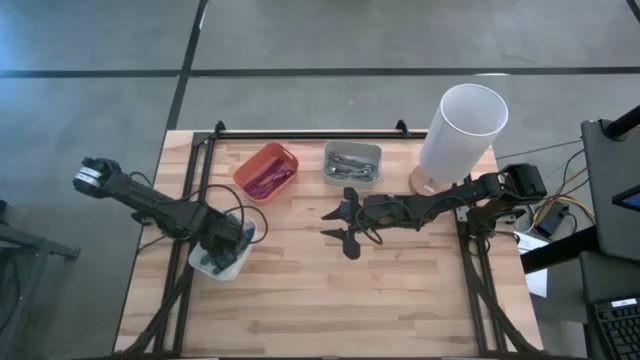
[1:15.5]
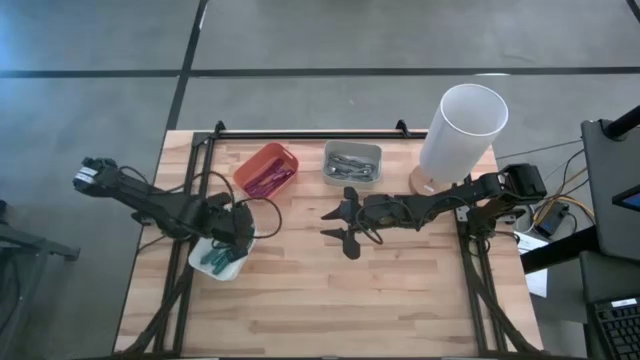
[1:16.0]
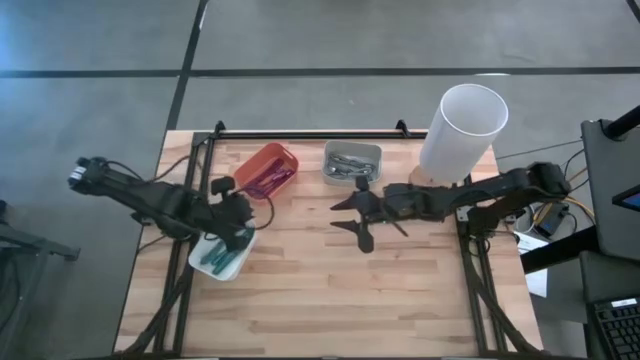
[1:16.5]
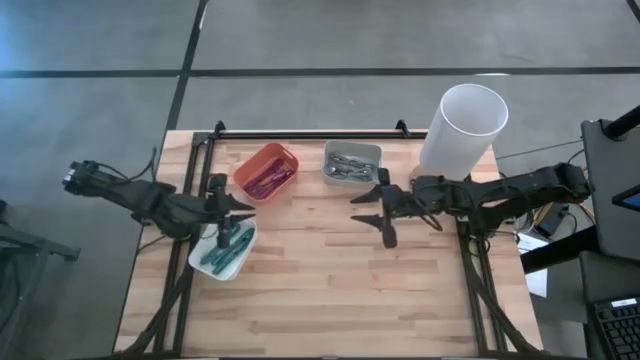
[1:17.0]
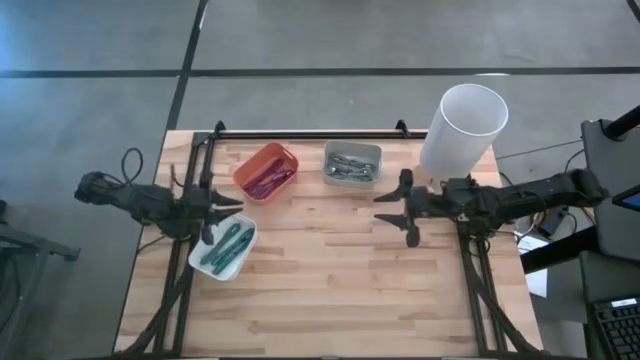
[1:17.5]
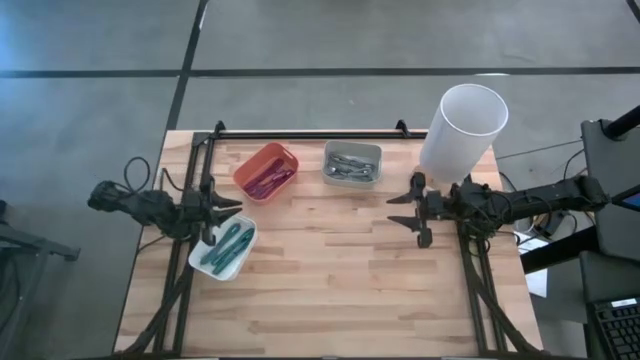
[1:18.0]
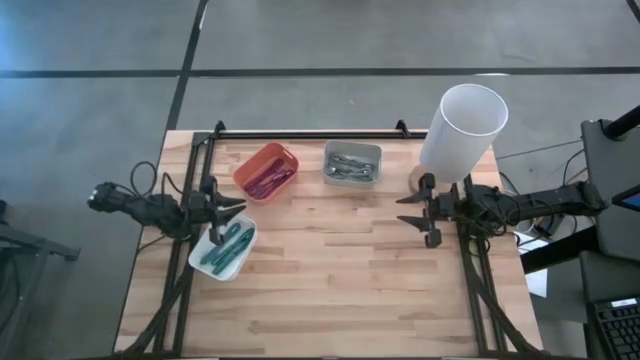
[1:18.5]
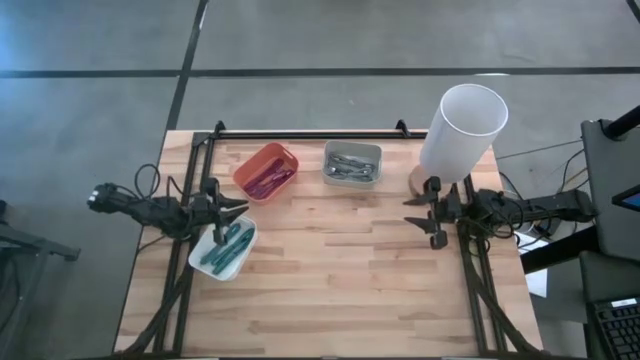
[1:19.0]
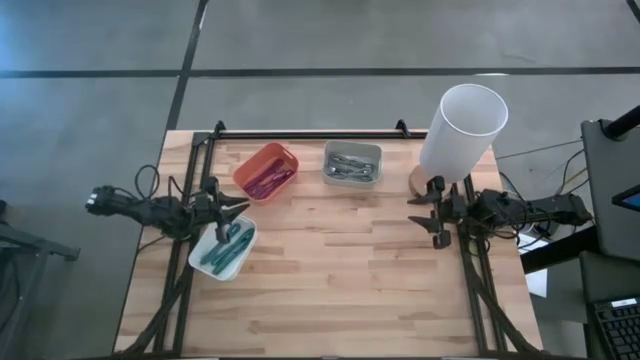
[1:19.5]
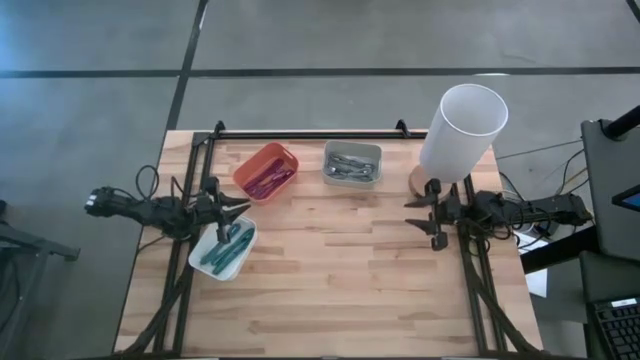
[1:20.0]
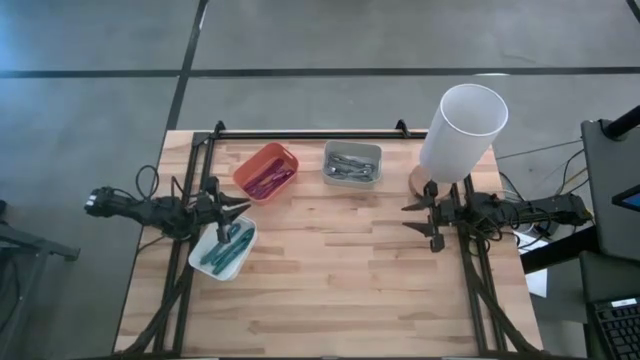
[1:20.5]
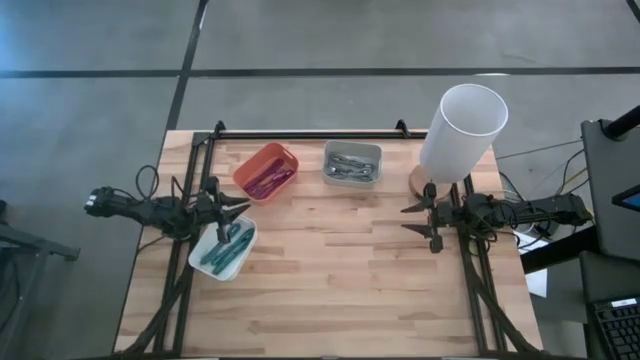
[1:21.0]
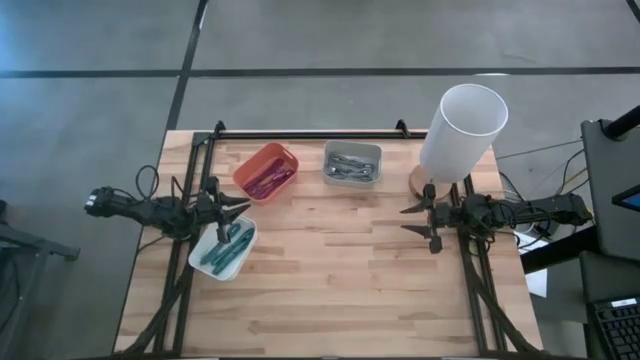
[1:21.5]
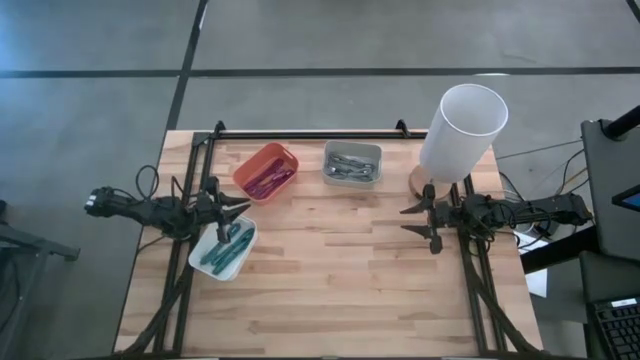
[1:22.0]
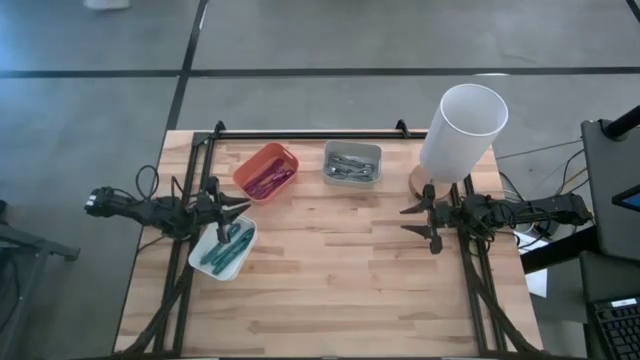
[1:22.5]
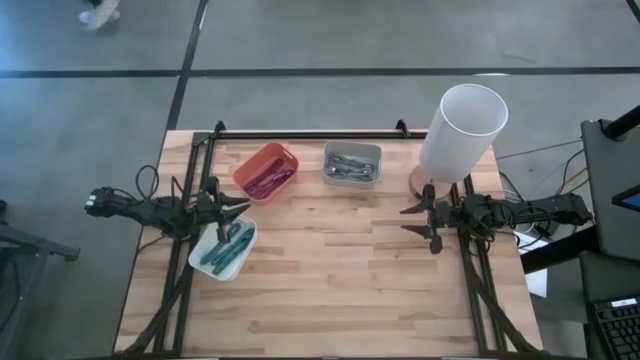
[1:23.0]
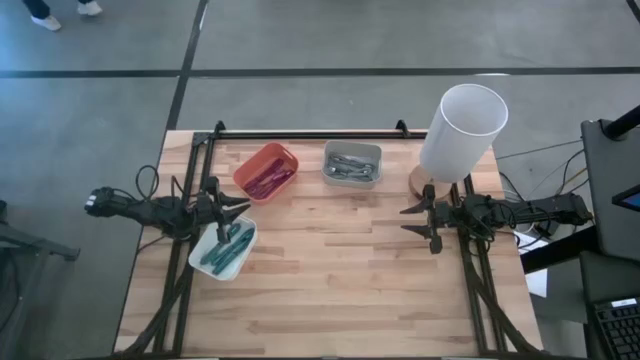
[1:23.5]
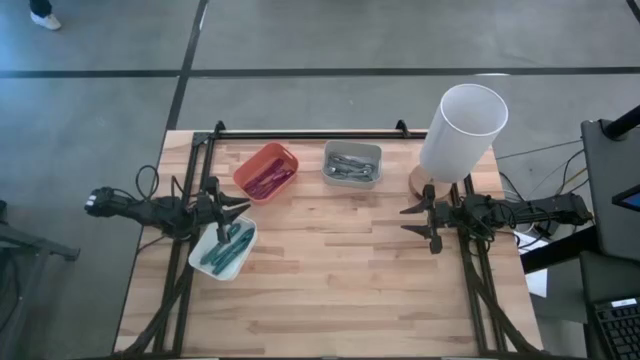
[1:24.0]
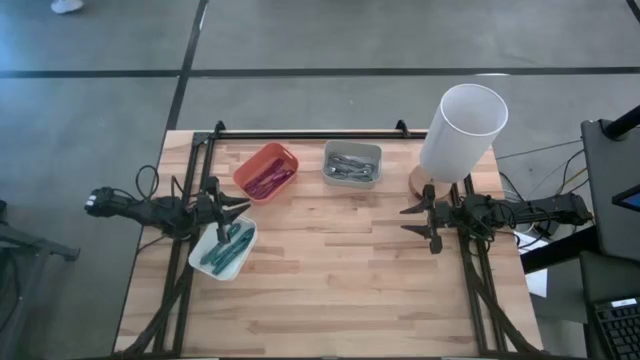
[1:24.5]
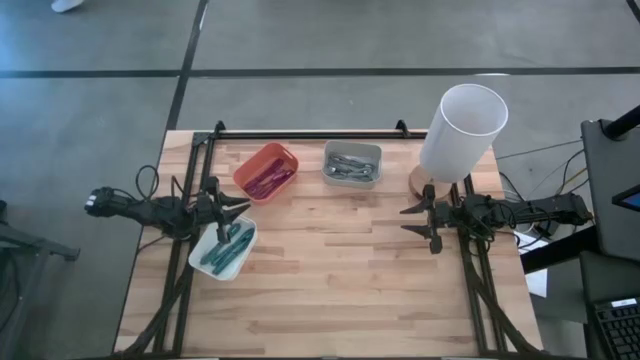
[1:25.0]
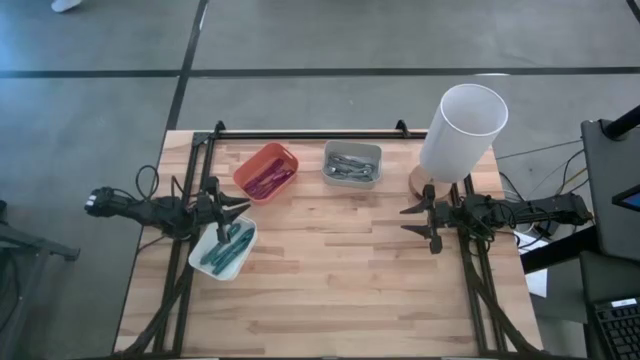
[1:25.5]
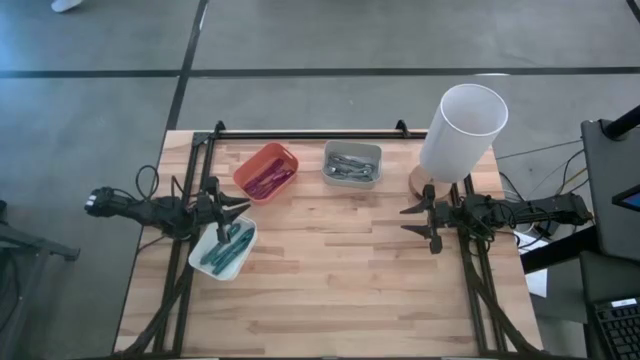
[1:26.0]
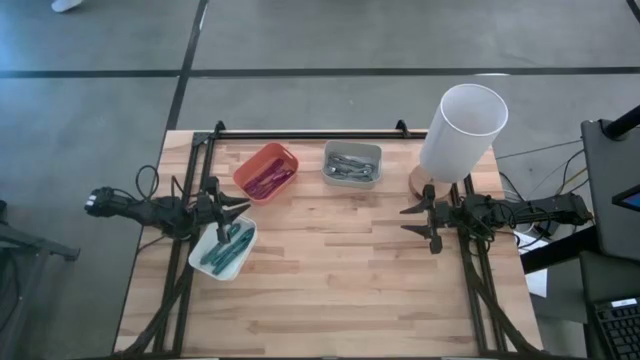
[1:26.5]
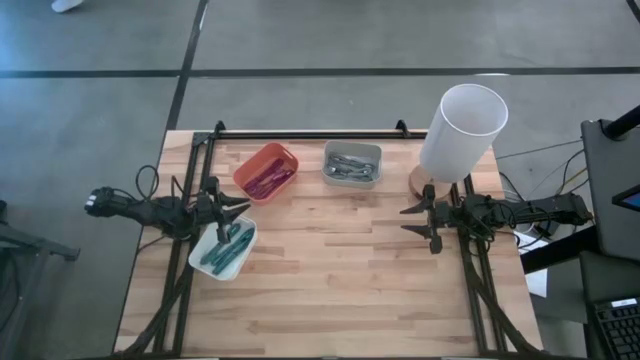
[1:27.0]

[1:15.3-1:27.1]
Task: Pick & Place USB Port
Return to Home Position

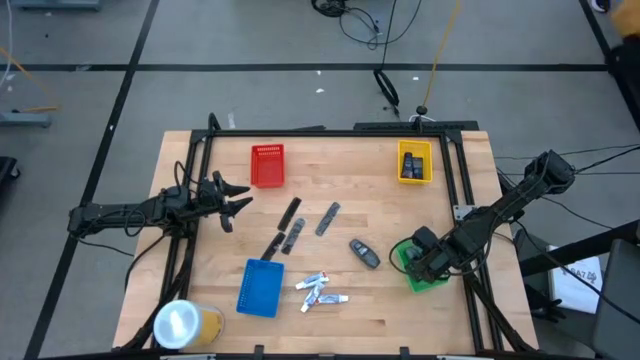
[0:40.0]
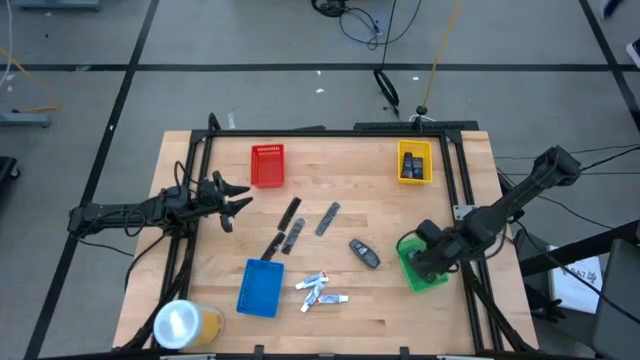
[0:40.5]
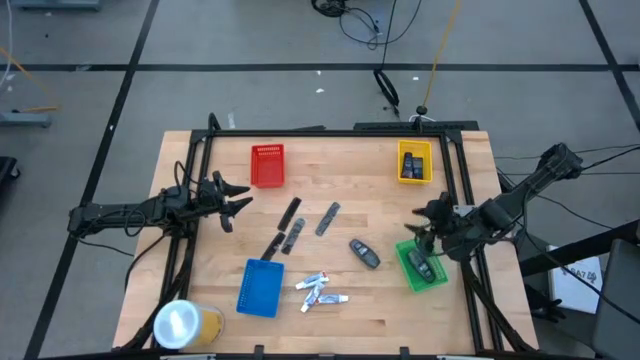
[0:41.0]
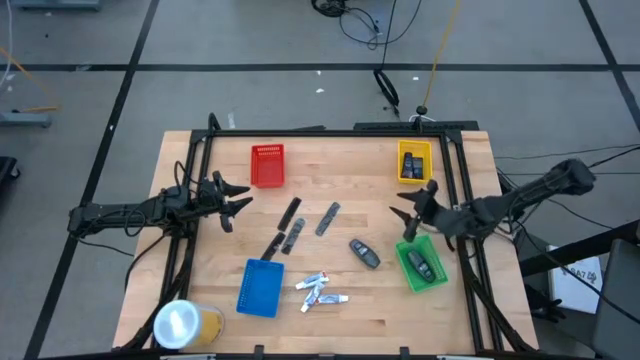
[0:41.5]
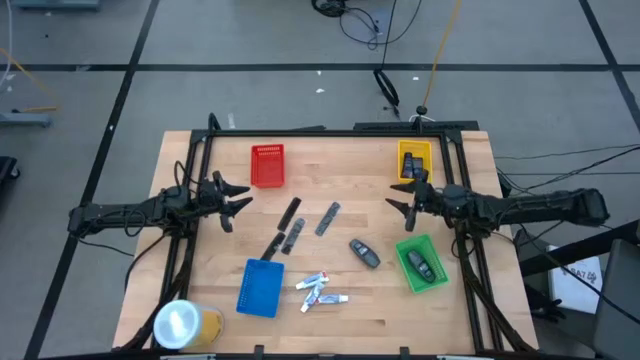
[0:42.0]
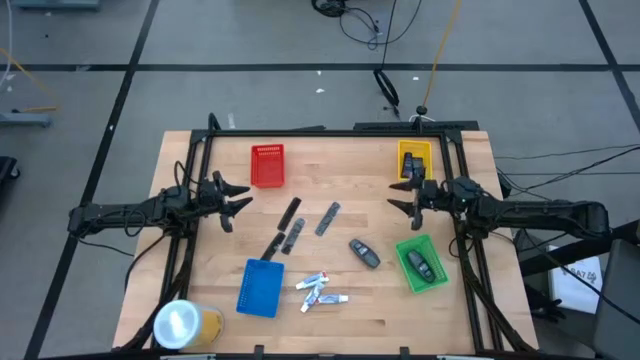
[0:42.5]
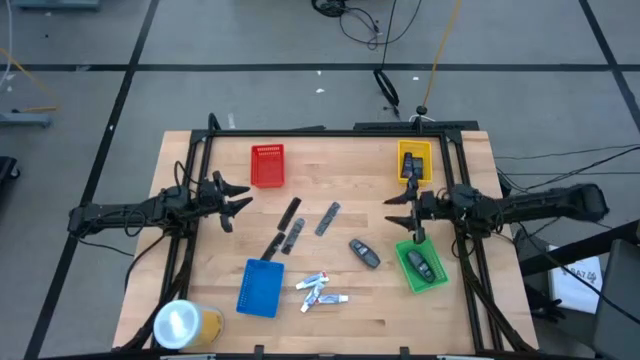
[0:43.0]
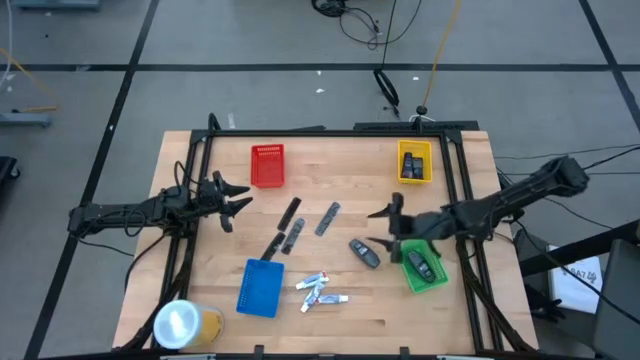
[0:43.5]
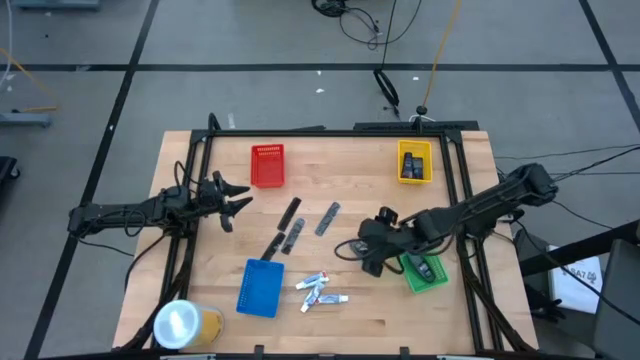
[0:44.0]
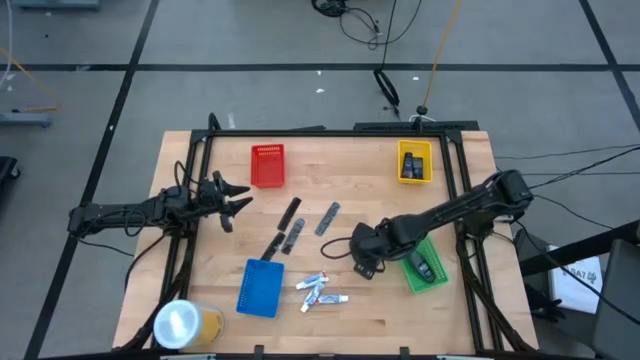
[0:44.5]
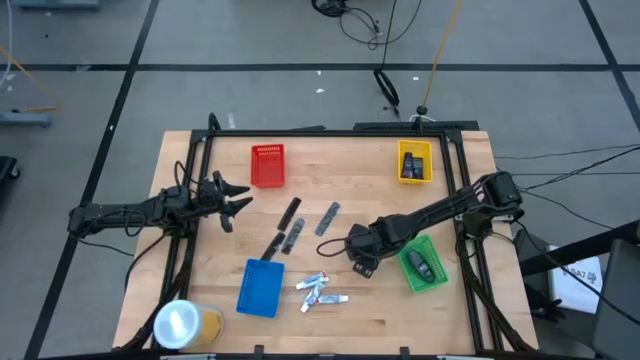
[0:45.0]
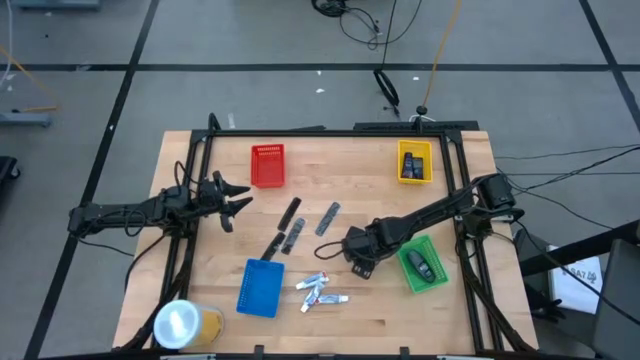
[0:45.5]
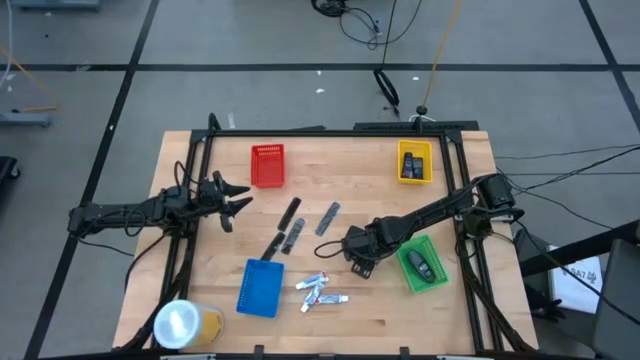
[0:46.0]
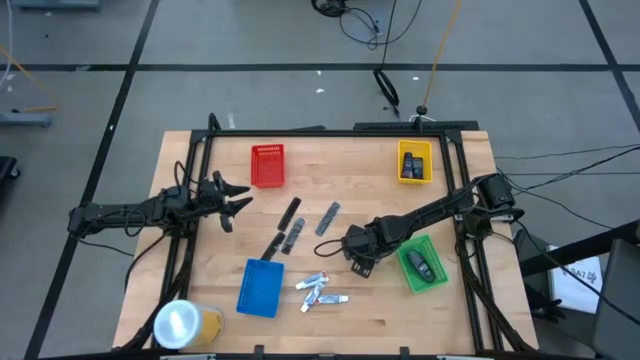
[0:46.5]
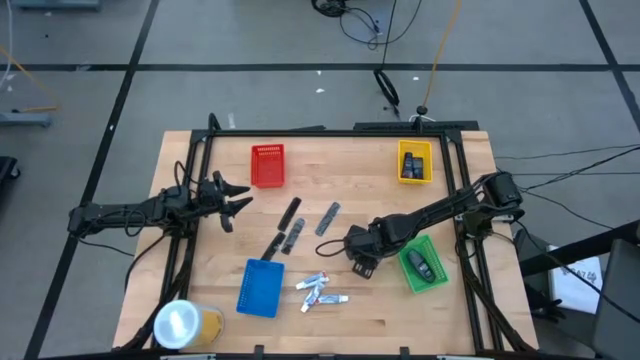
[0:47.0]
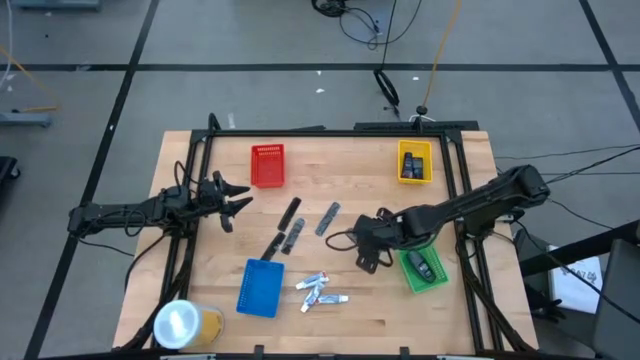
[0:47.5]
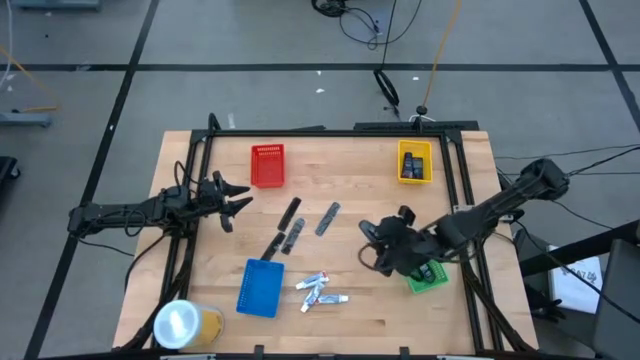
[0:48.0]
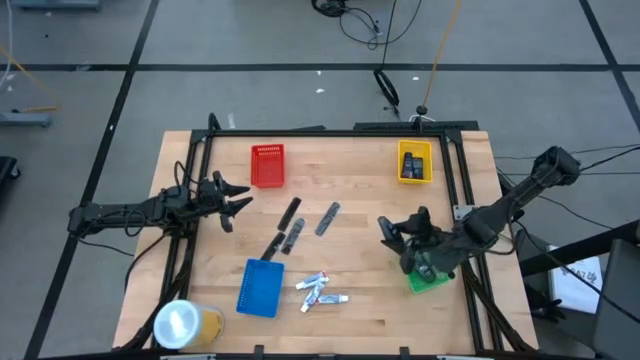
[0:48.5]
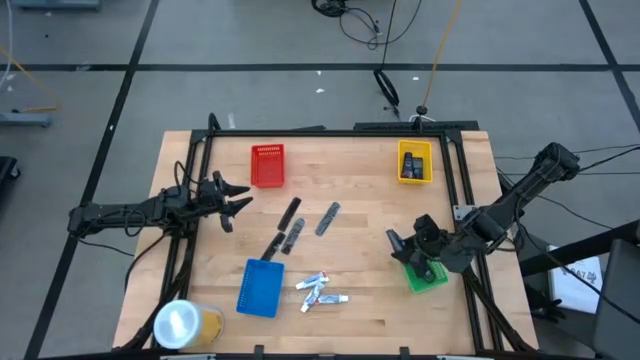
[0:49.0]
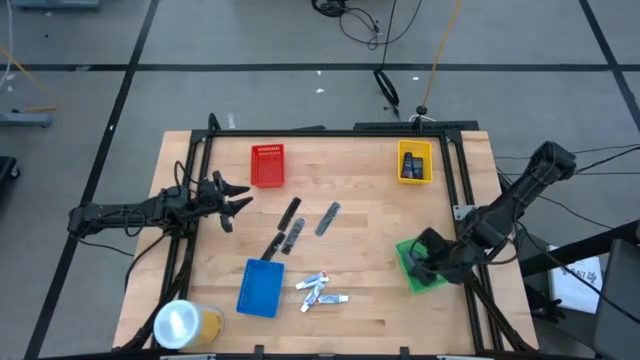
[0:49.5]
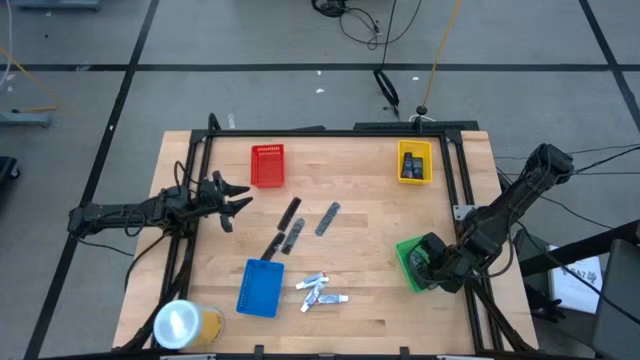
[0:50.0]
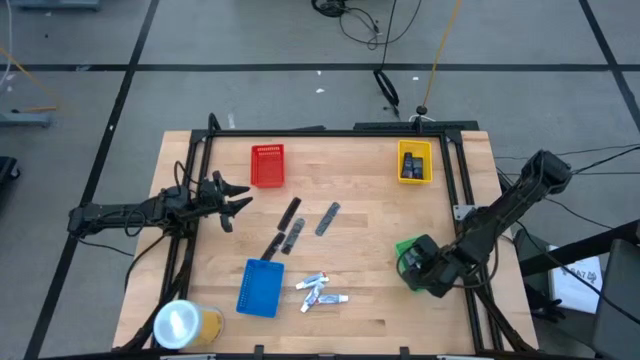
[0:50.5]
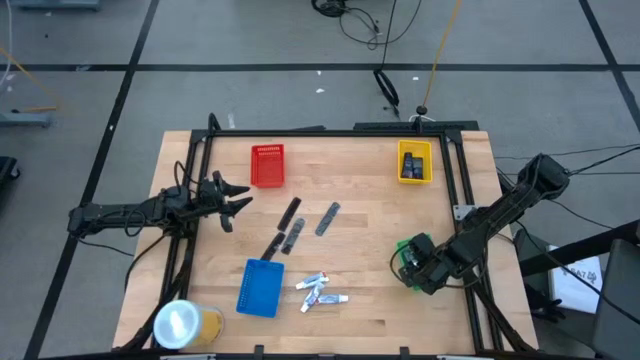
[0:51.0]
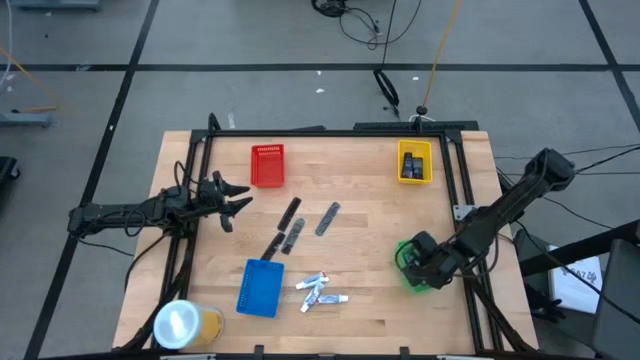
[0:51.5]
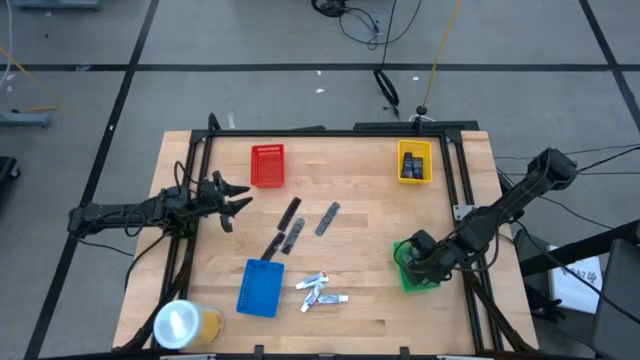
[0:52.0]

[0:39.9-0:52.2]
Task: Pick & Place Travel size toiletries
Put the gray deodorant into the green basket
